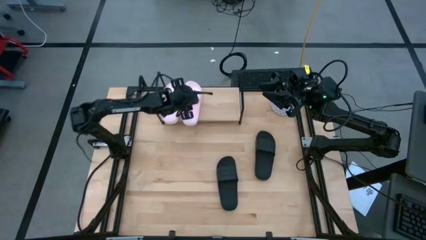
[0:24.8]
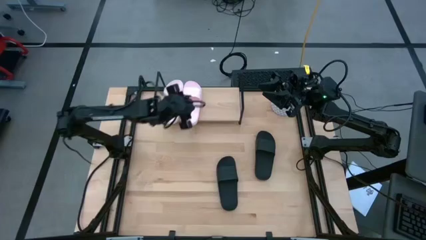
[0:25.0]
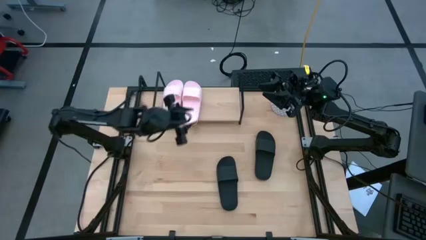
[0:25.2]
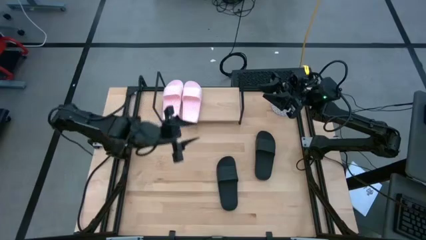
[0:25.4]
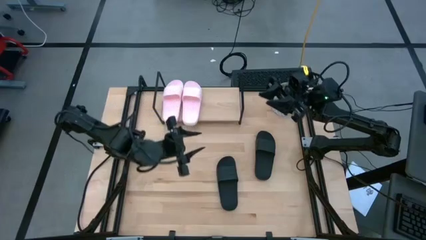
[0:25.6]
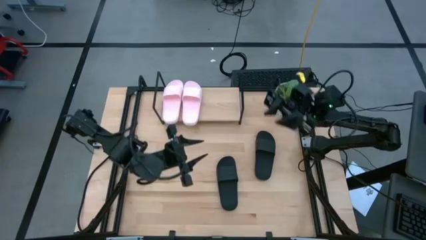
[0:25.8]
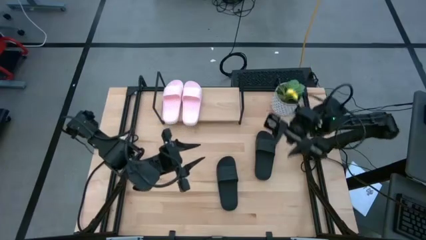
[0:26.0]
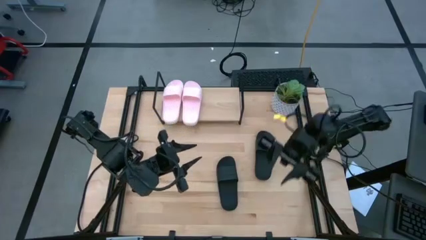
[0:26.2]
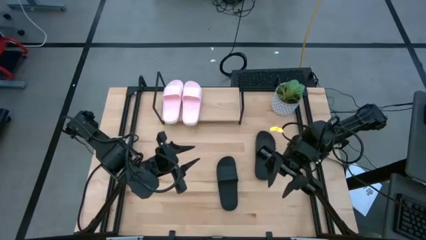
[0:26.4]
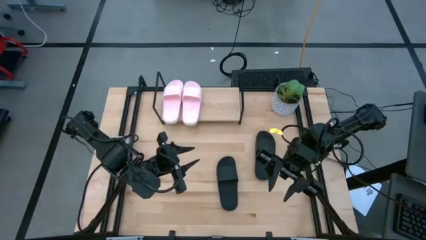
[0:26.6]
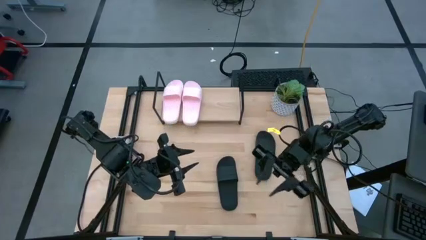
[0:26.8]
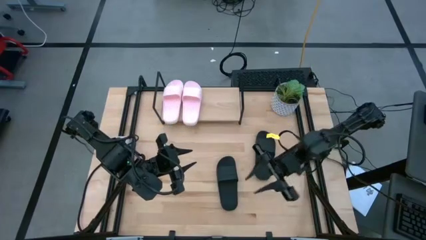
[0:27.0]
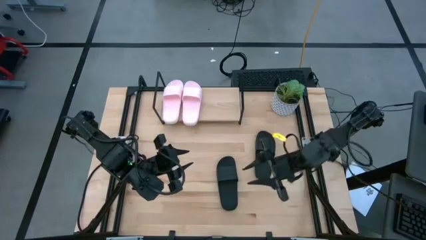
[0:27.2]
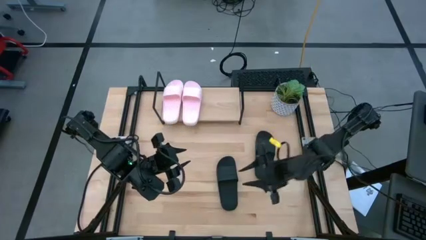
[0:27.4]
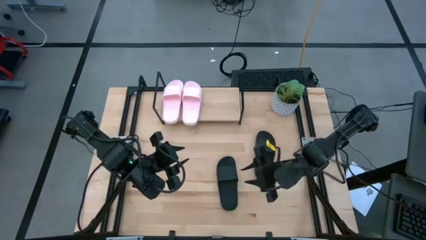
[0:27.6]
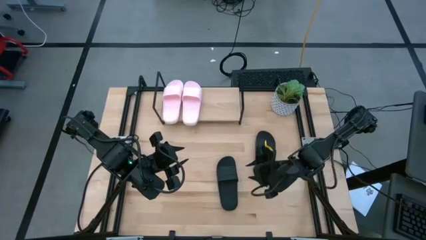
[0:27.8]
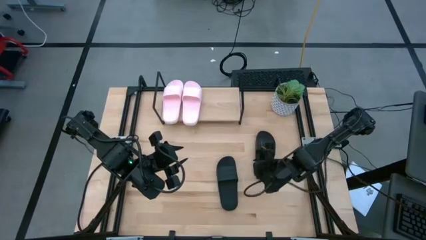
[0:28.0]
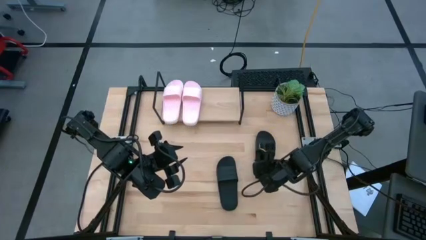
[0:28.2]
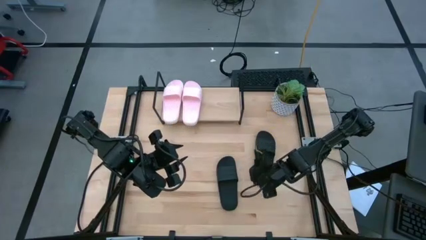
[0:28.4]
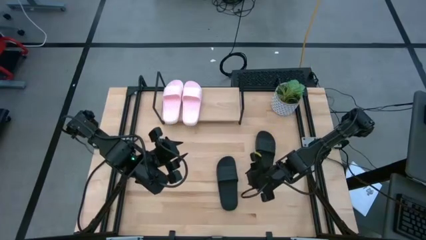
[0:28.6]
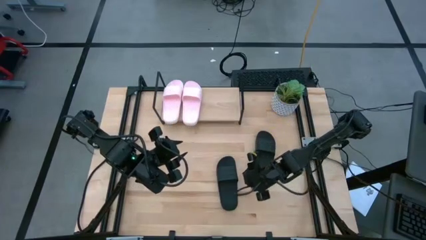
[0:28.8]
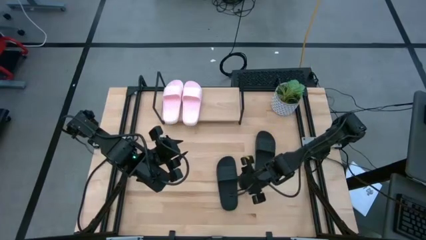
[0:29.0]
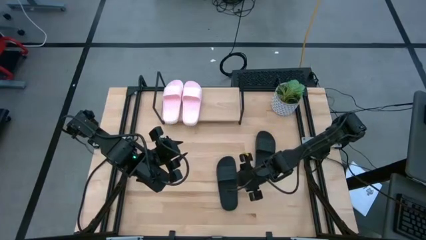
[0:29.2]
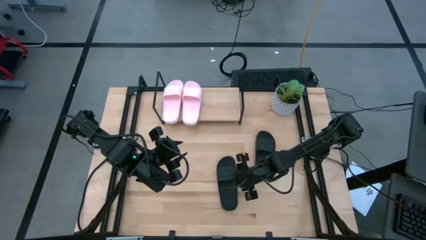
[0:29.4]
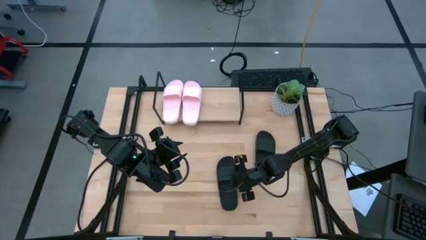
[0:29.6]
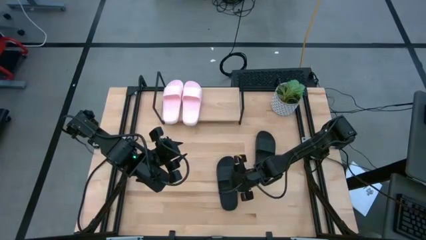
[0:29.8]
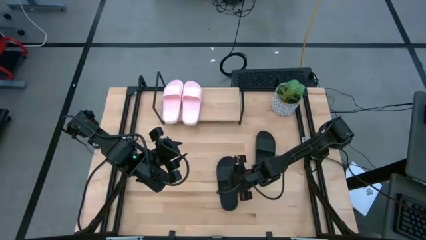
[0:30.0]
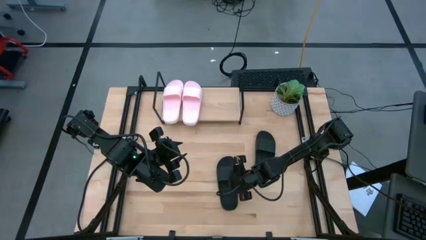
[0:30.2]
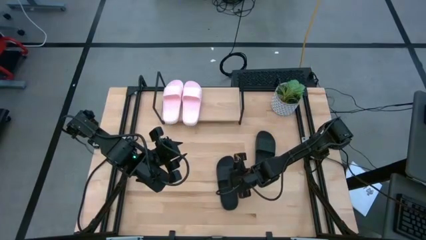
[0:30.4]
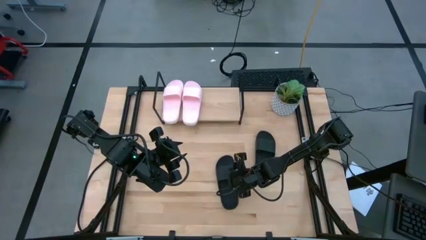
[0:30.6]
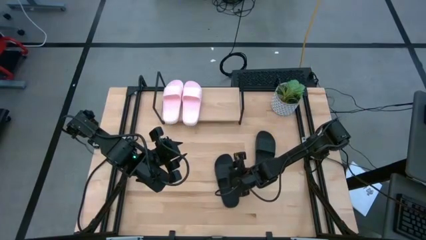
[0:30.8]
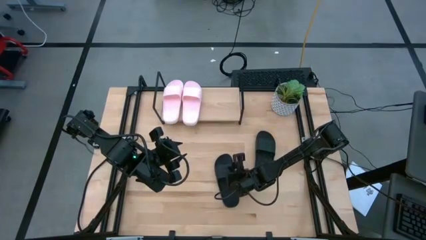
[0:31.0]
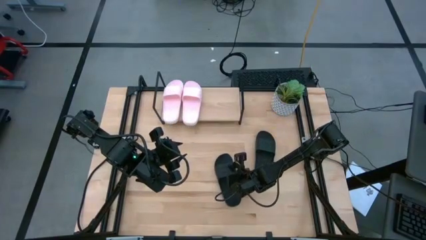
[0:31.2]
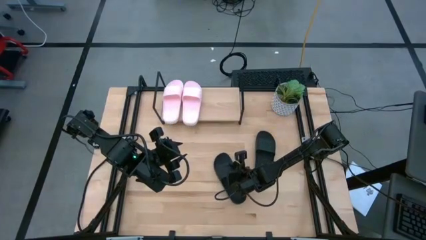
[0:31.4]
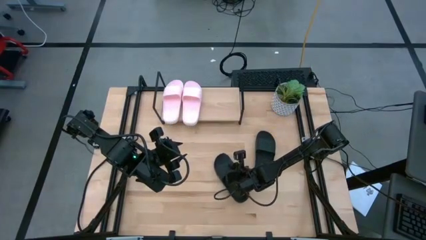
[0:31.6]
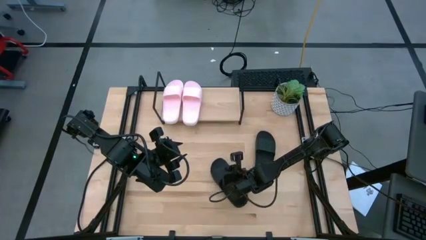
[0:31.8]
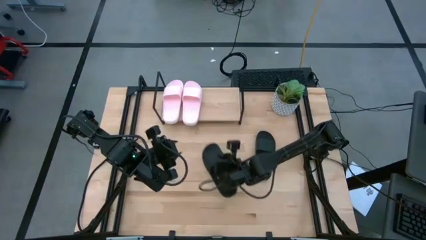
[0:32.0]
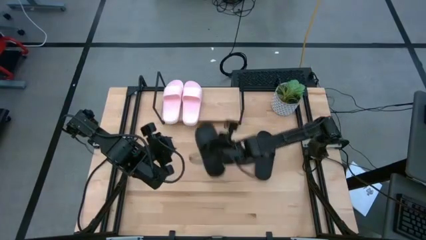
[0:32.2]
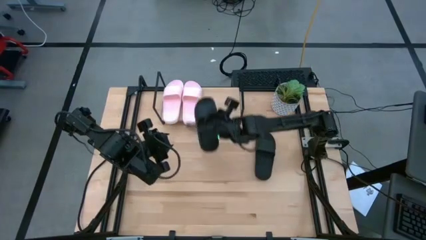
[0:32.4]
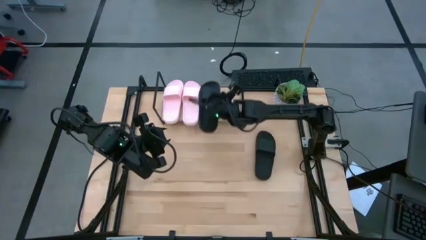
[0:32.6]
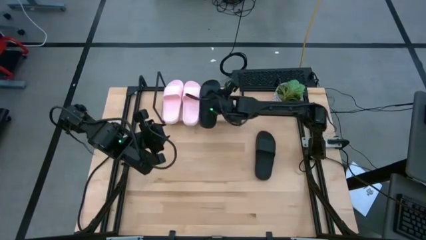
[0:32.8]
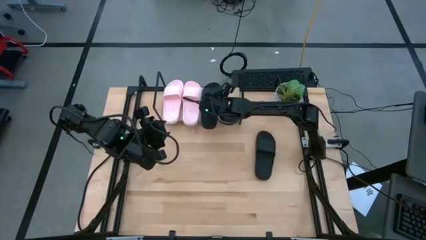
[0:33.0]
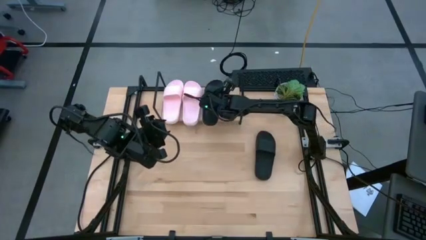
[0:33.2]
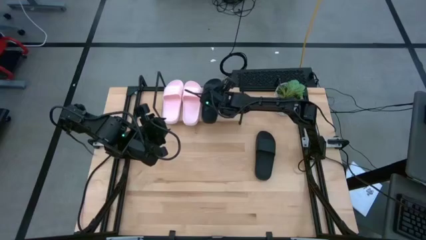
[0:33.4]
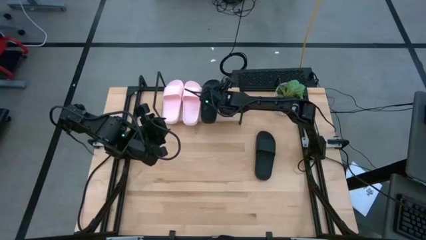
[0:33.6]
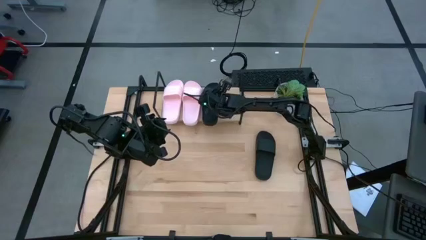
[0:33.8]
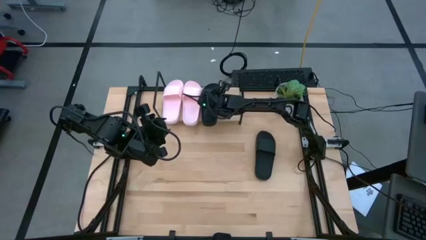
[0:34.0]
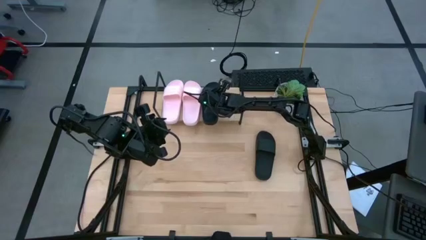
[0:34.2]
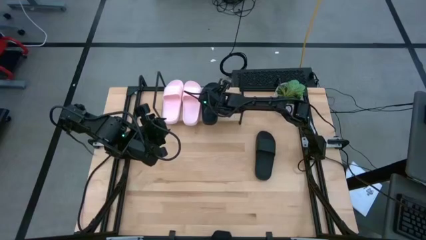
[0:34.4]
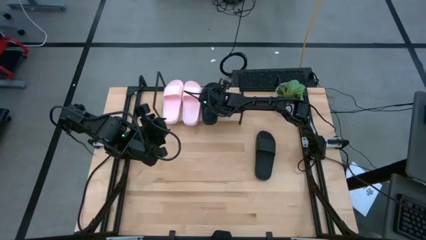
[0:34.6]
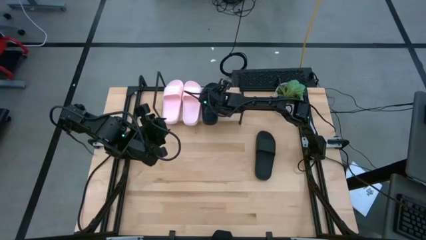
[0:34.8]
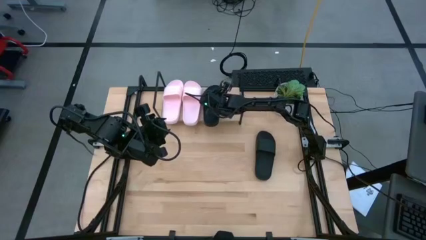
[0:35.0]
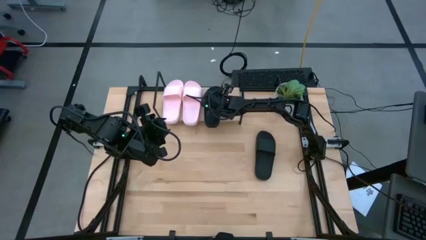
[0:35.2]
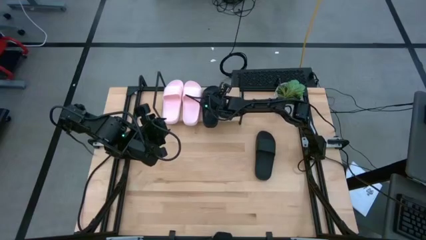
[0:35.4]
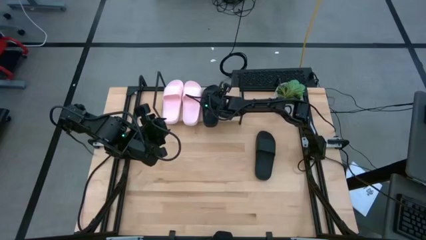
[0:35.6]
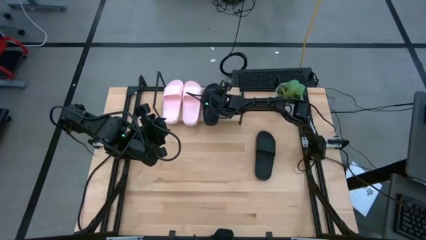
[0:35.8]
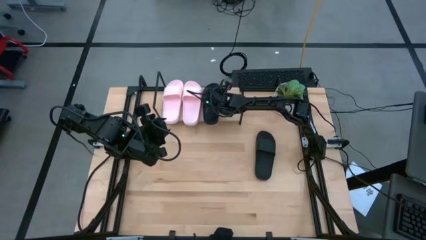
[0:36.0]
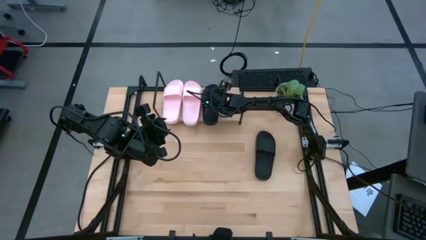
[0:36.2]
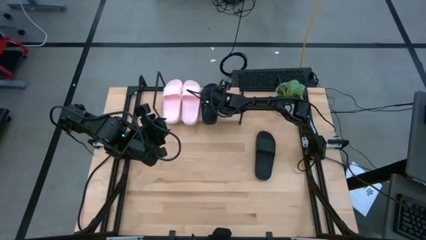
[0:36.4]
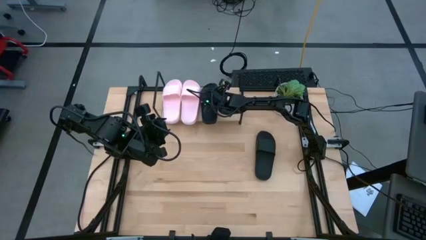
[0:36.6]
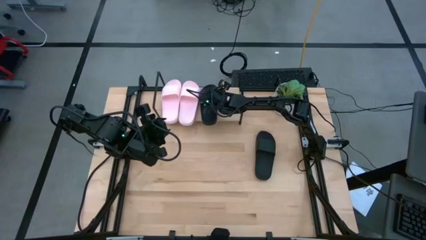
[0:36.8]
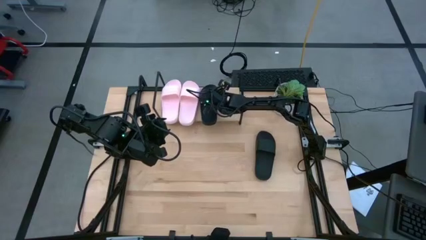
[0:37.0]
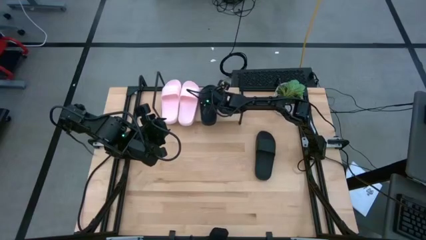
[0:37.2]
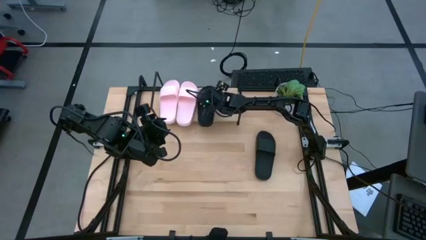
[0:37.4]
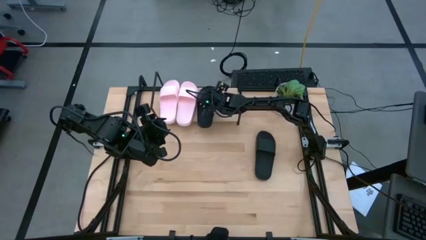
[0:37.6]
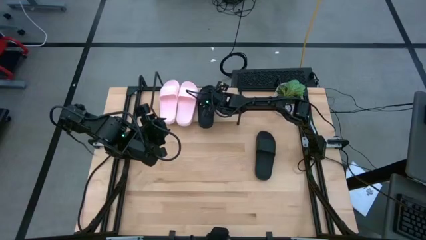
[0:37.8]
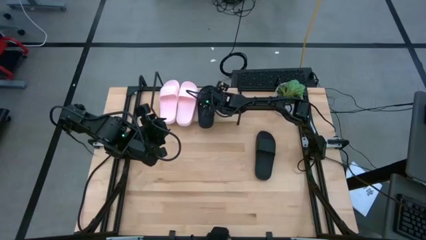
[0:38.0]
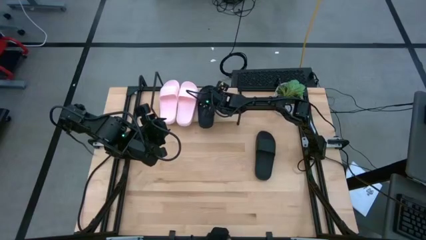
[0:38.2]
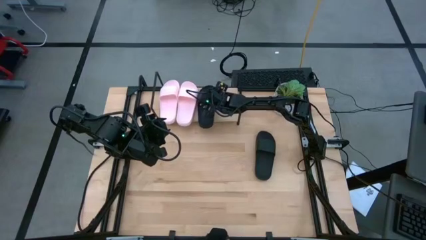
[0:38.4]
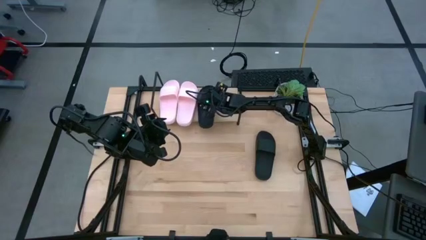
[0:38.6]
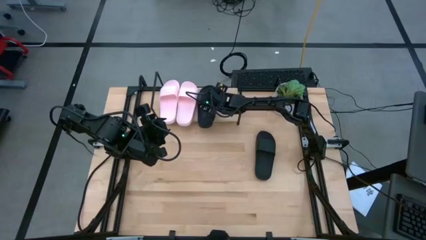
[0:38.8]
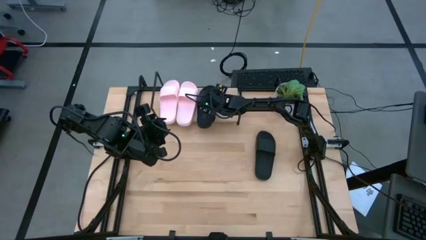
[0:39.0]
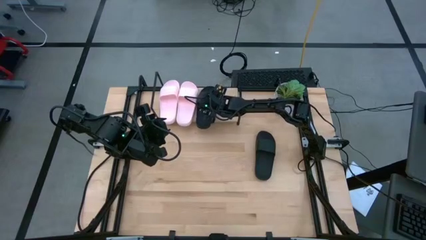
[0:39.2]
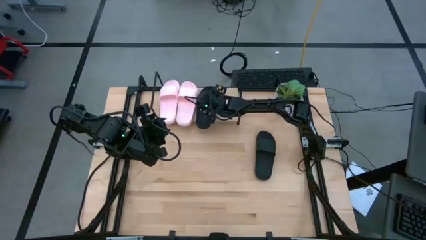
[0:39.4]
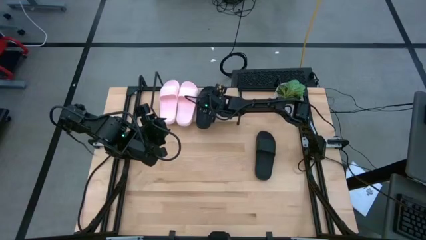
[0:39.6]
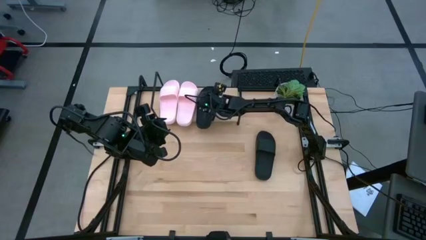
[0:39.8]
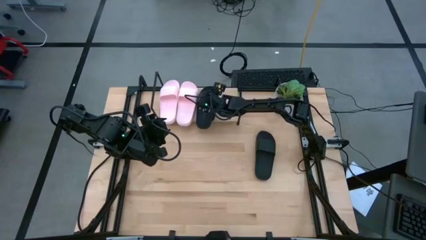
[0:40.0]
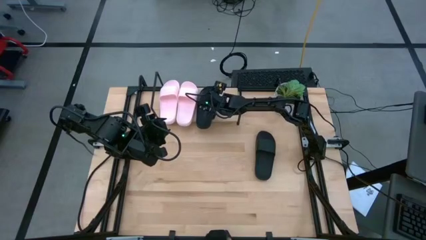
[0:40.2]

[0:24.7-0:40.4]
Task: Pick and place slides into the shelf
Put the left black slipper on the shelf
